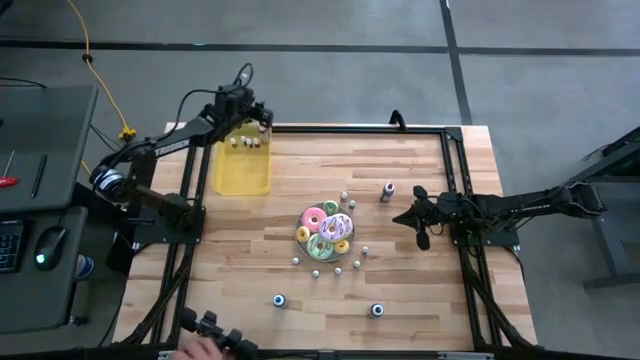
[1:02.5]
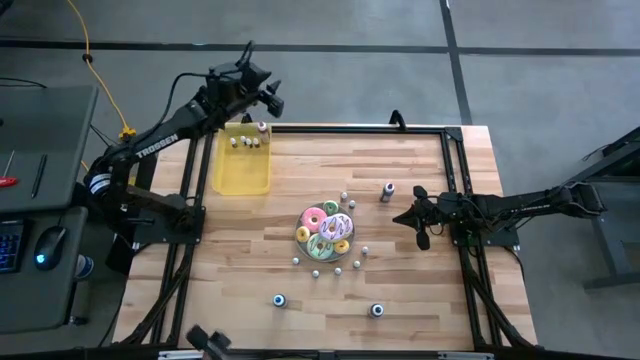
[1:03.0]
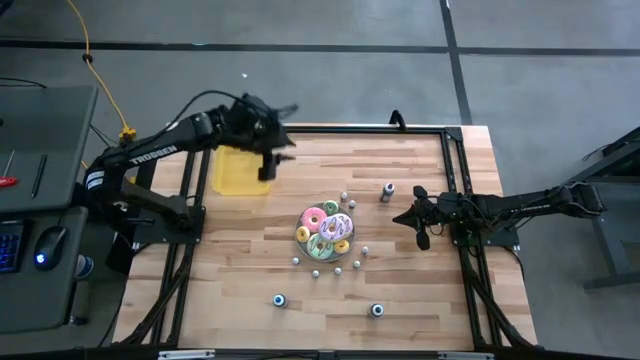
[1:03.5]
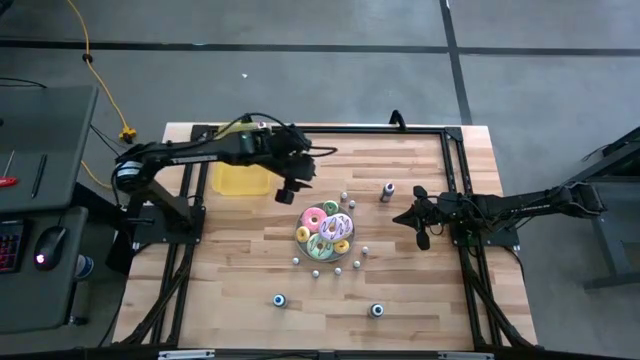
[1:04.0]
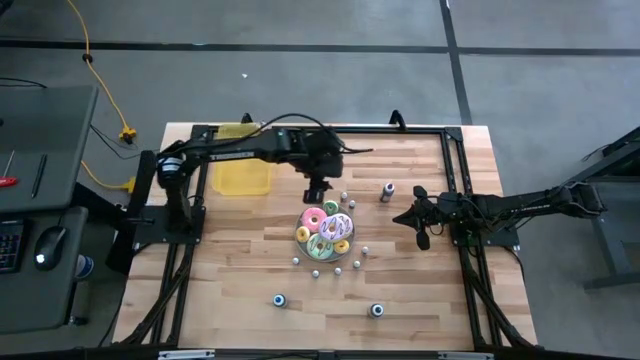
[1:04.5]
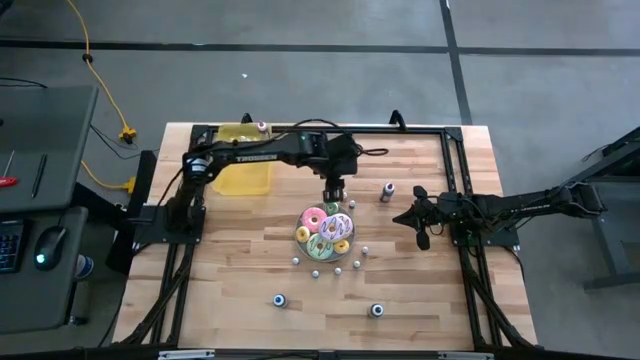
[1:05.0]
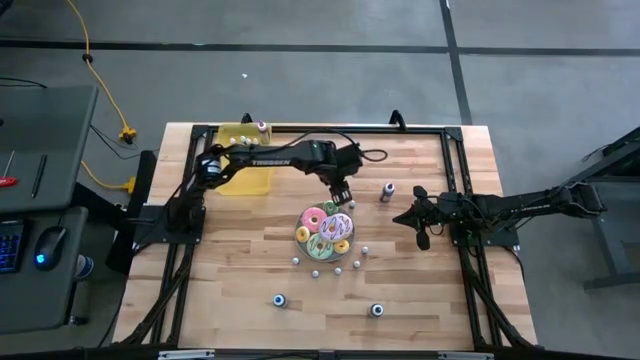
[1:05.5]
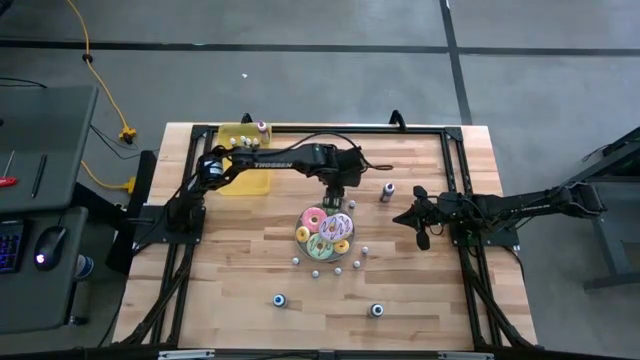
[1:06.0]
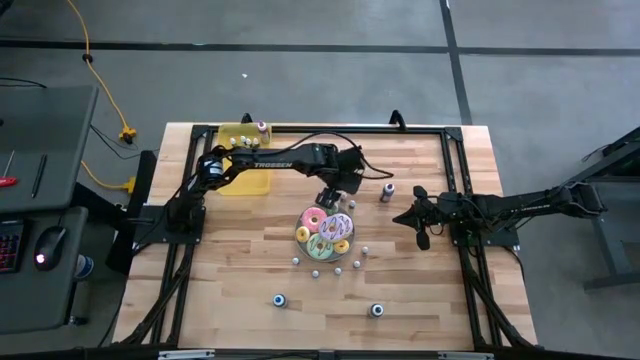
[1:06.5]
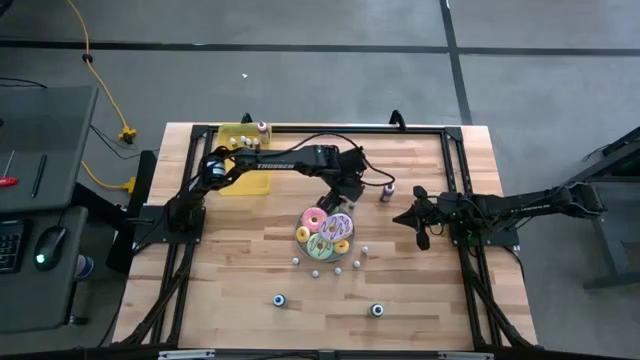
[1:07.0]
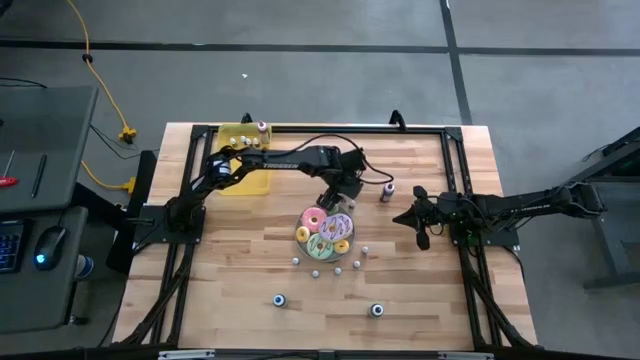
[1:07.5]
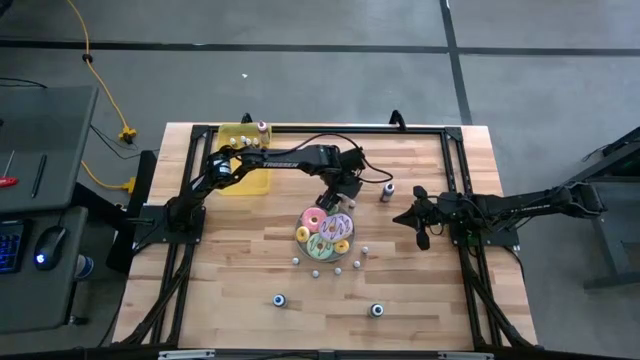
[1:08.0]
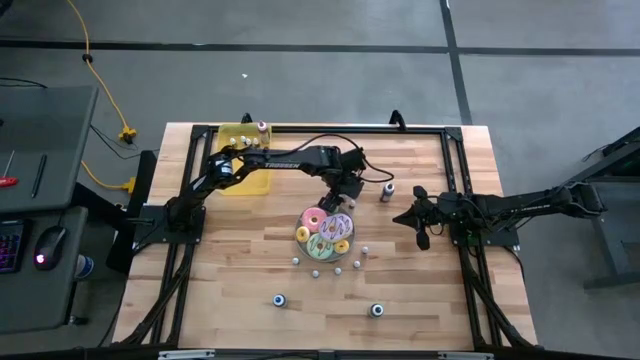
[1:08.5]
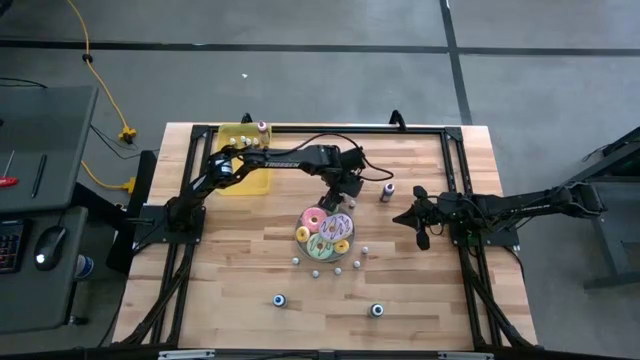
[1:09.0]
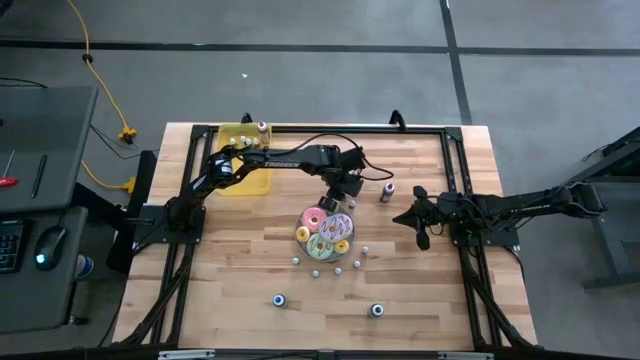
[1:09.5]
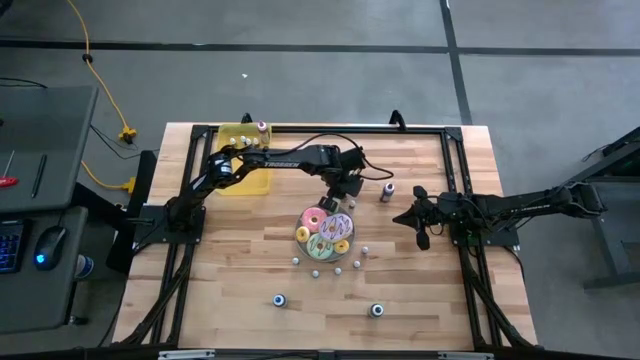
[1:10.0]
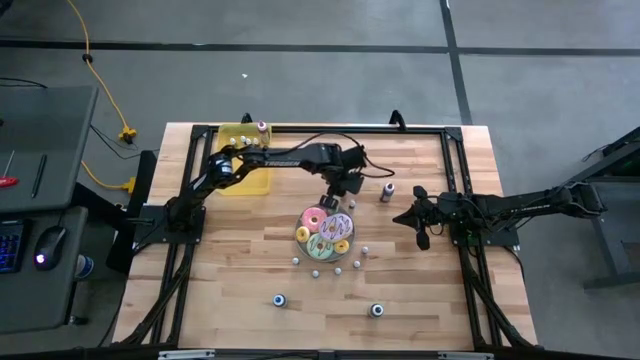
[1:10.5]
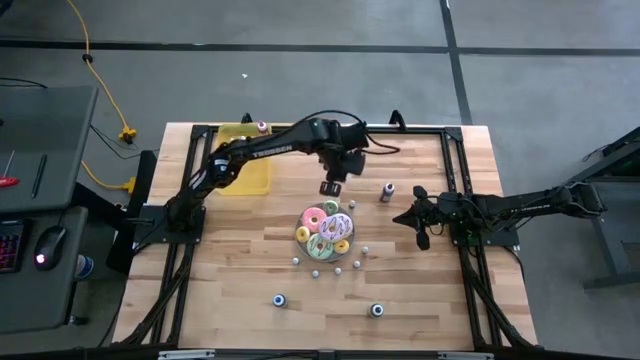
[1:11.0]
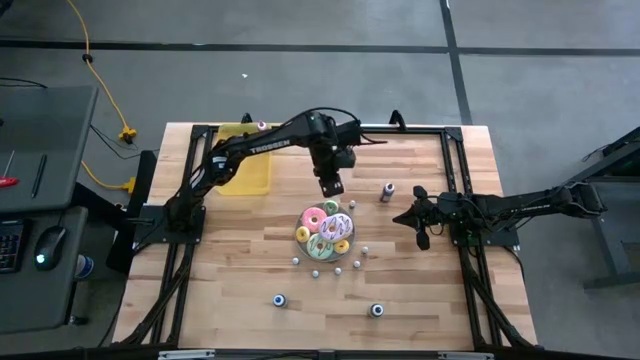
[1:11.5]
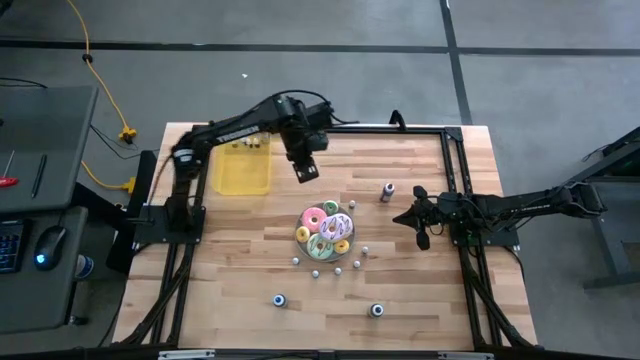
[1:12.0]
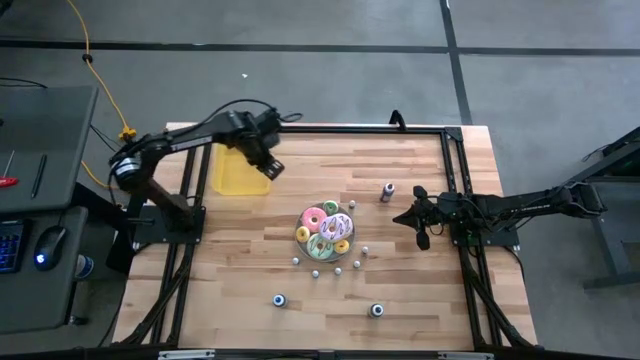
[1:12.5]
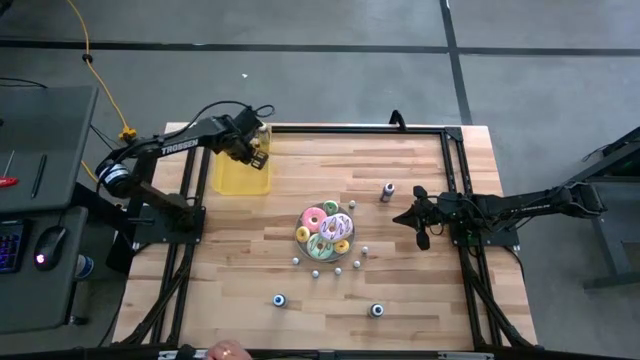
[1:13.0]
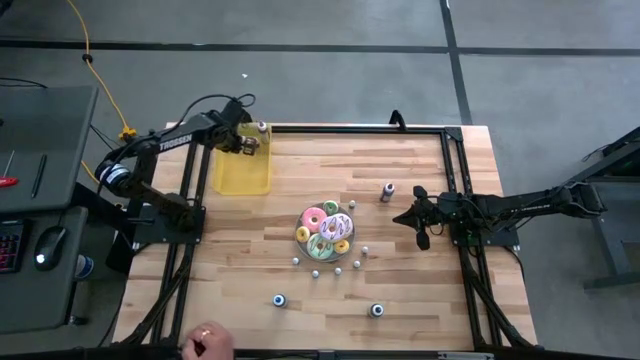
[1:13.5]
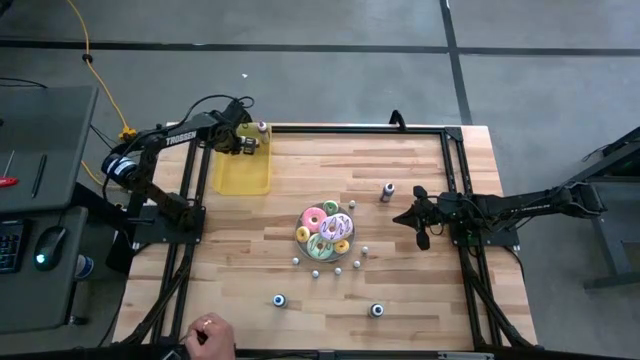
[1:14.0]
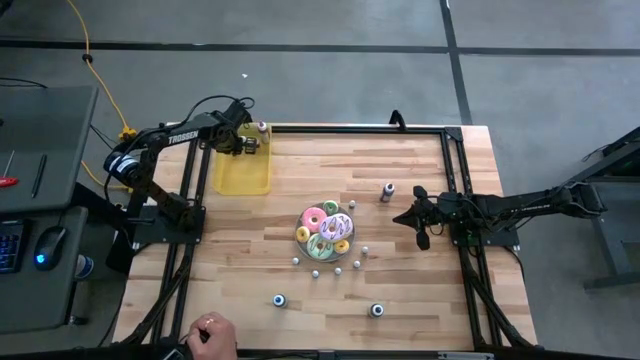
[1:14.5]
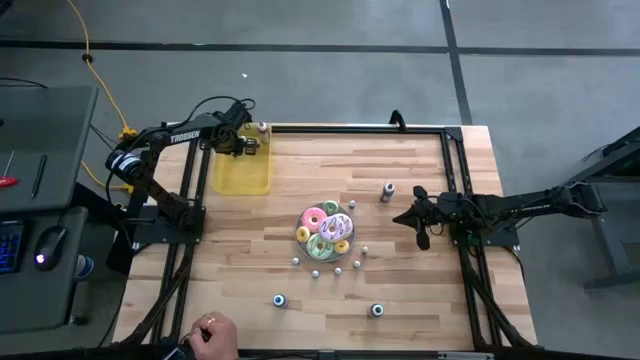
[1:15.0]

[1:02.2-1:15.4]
Task: Pick & Place food coloring
Put the small black food coloring bottle into the yellow bin

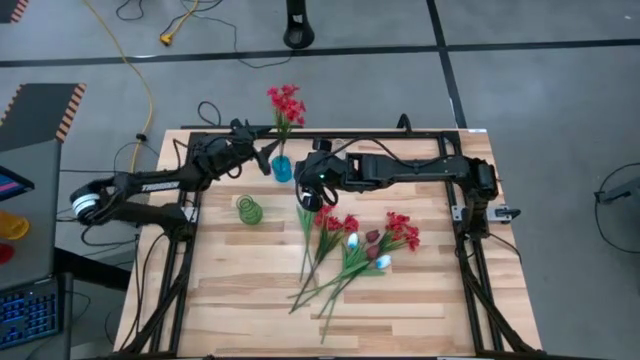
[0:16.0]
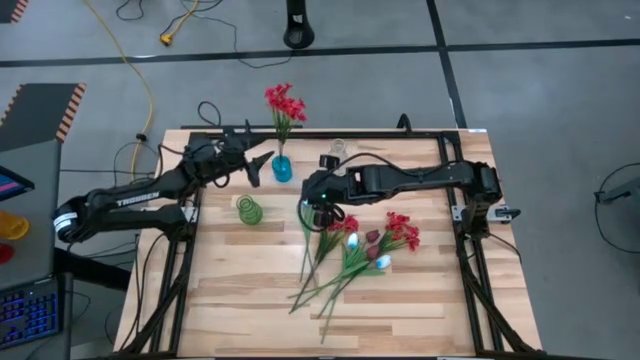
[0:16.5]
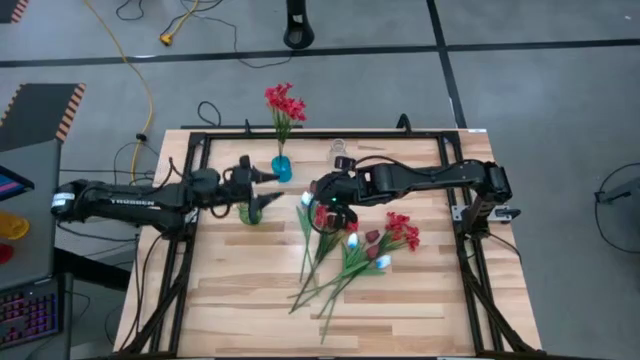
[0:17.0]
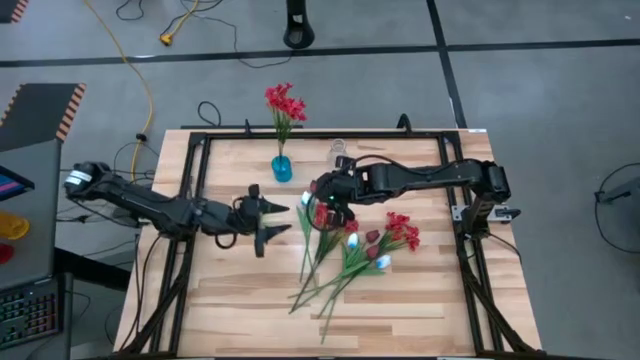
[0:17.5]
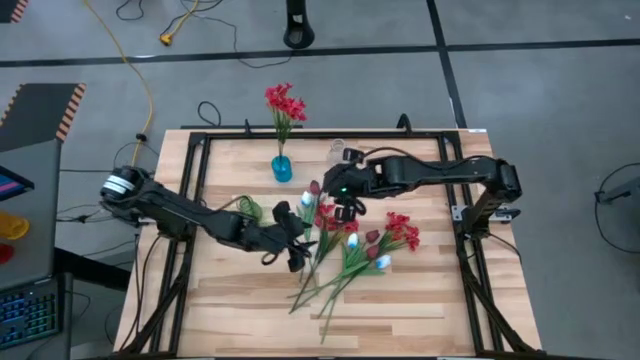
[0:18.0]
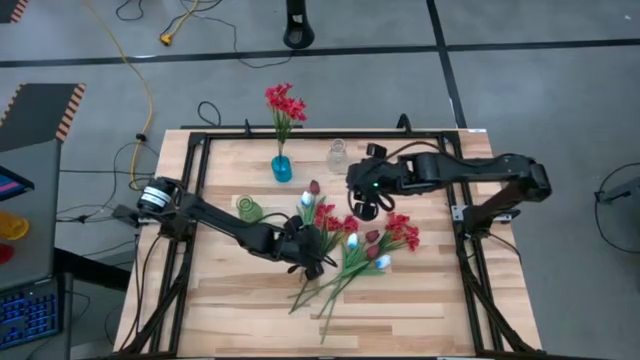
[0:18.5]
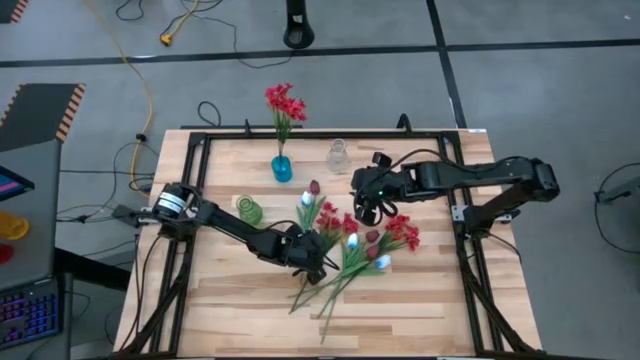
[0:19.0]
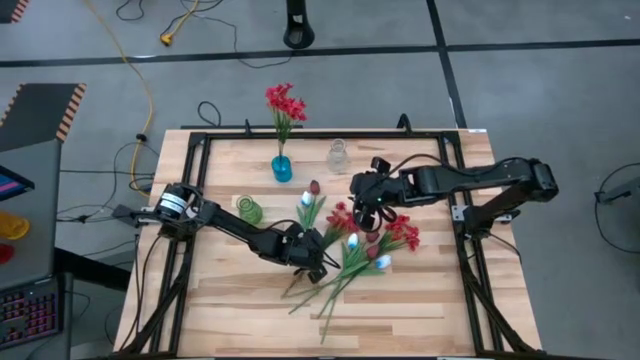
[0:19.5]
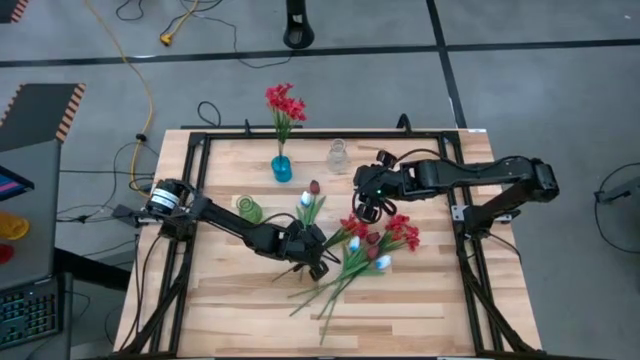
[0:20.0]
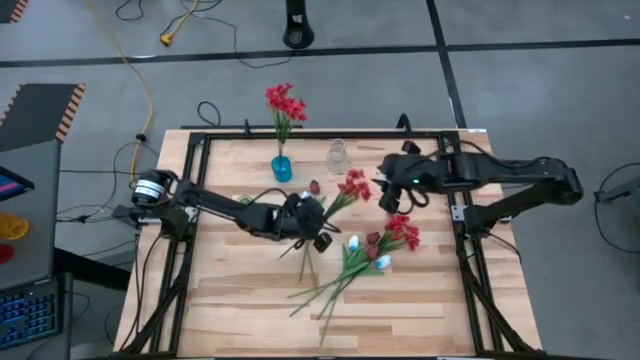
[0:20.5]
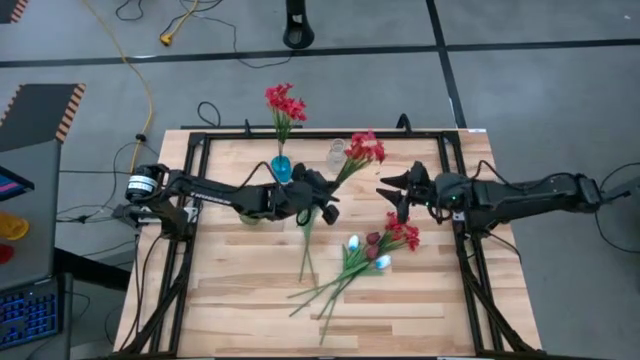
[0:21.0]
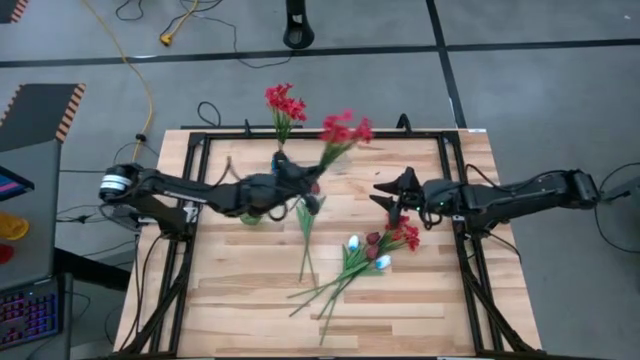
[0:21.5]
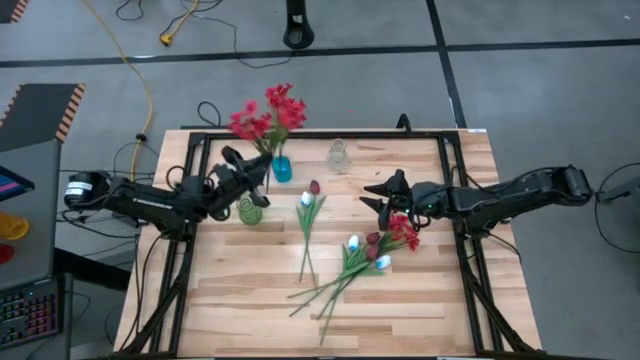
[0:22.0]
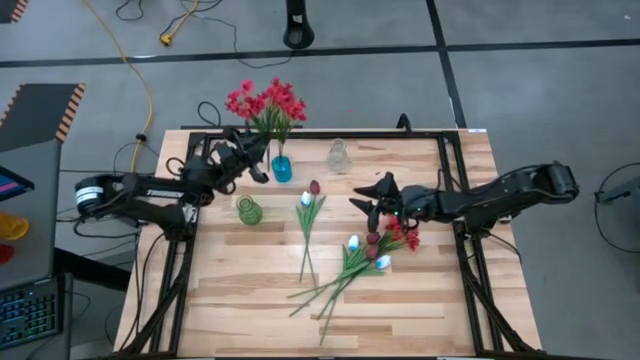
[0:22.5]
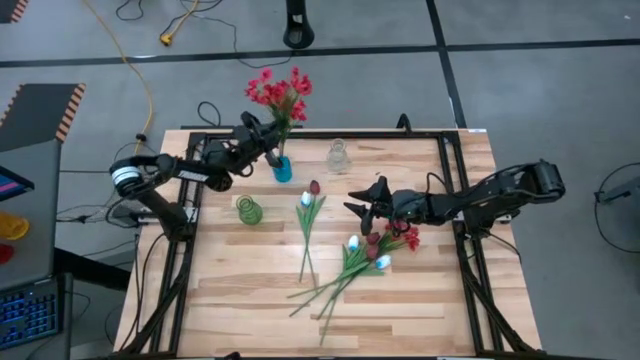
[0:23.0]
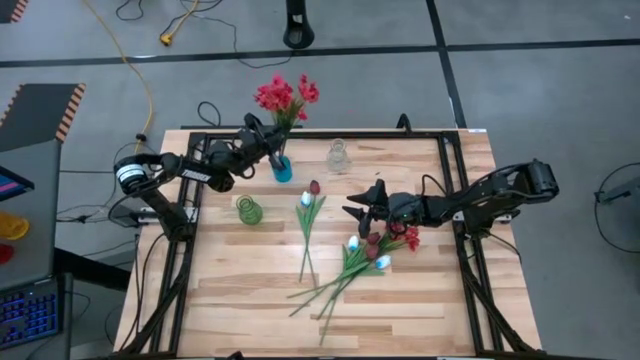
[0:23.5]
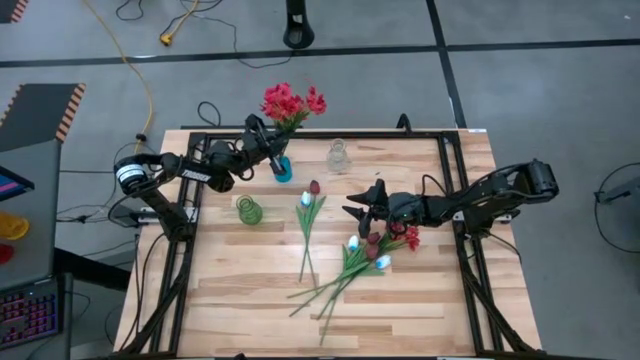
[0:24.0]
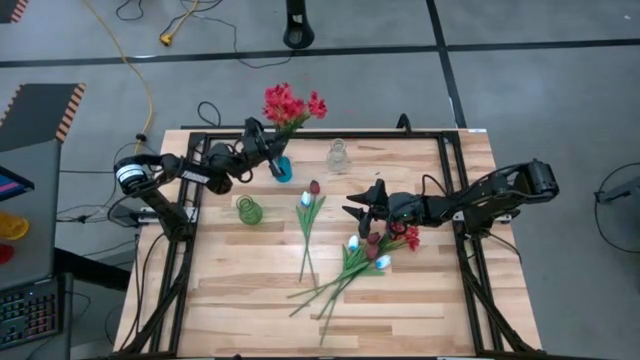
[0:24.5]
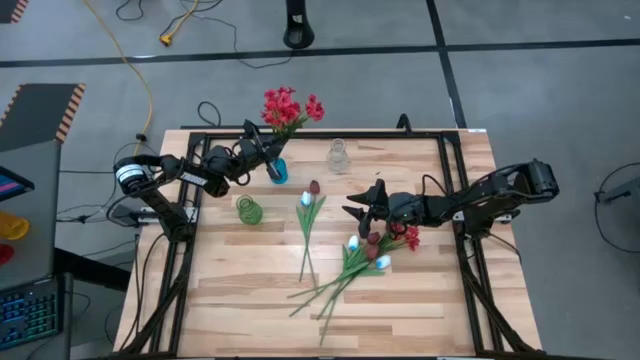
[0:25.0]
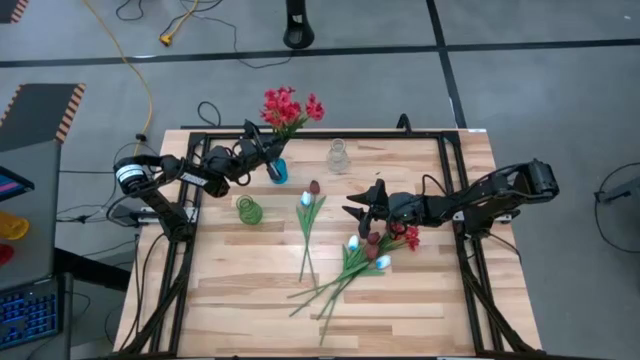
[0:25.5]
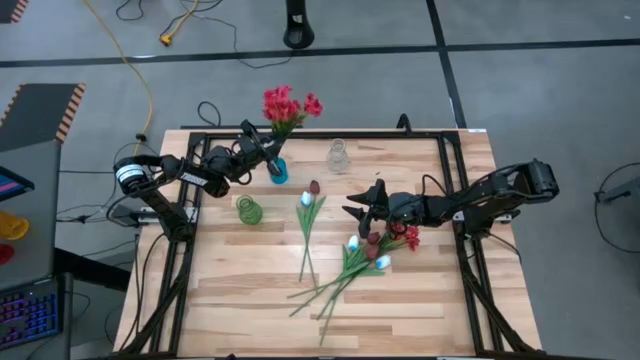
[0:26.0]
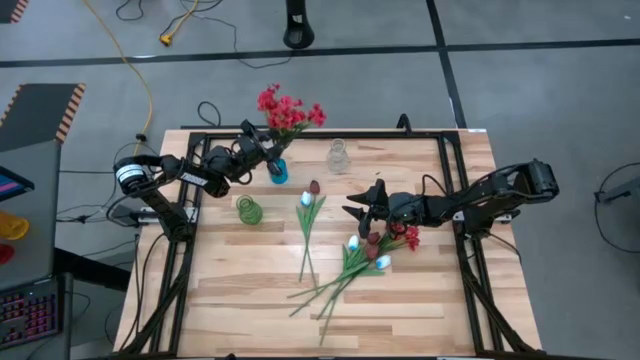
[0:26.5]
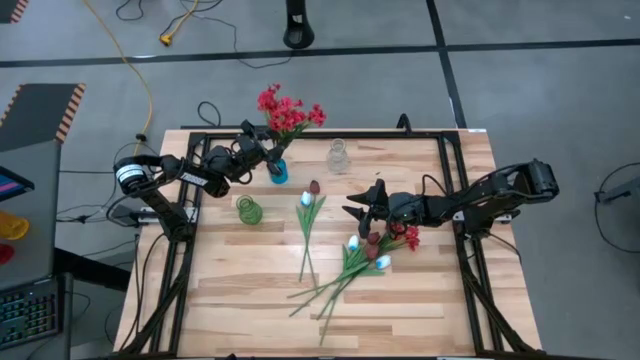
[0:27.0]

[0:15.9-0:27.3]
Task: Sort flowers into vase by color
Put the left red flowers into the blue vase
